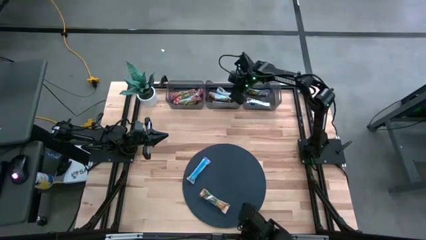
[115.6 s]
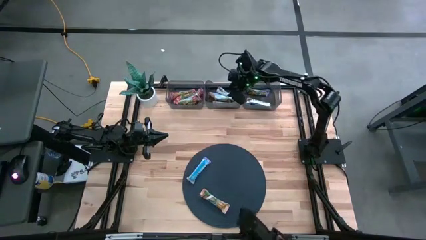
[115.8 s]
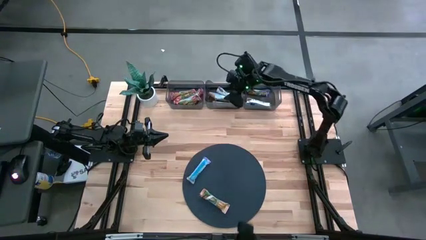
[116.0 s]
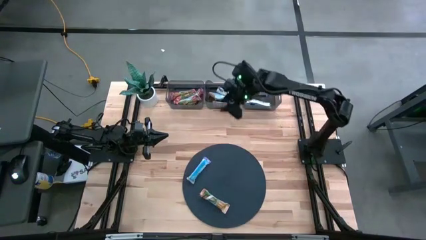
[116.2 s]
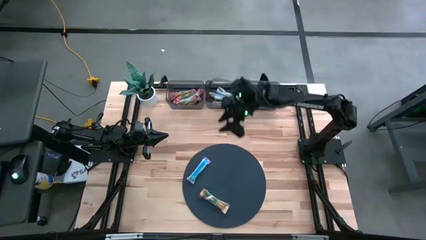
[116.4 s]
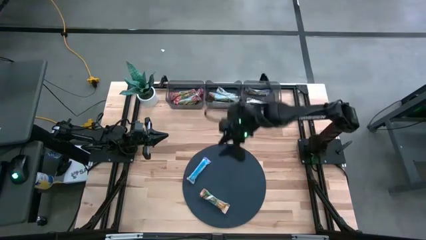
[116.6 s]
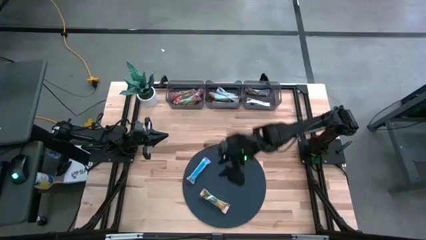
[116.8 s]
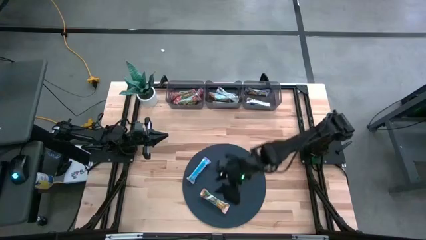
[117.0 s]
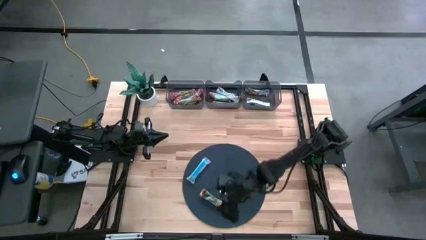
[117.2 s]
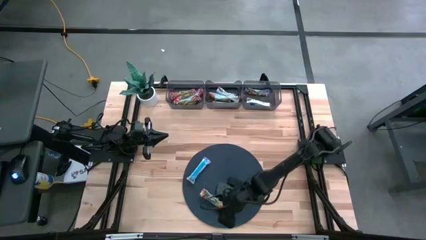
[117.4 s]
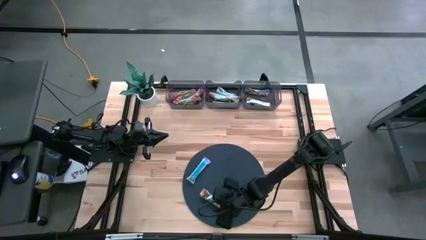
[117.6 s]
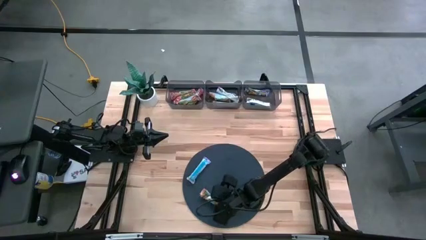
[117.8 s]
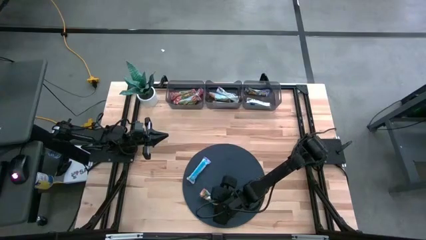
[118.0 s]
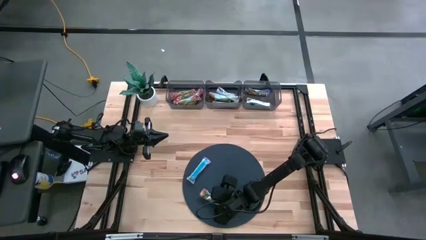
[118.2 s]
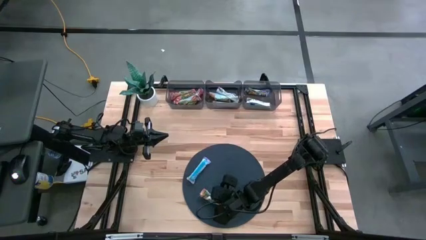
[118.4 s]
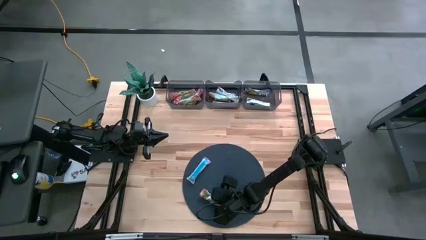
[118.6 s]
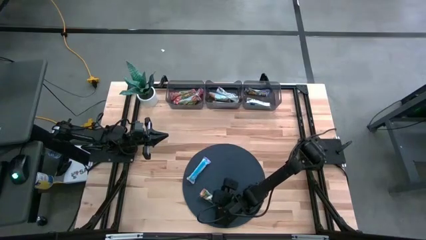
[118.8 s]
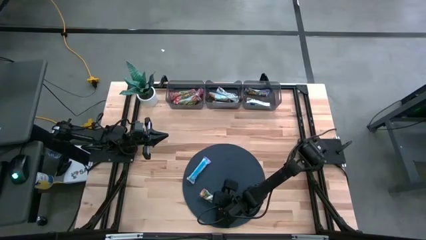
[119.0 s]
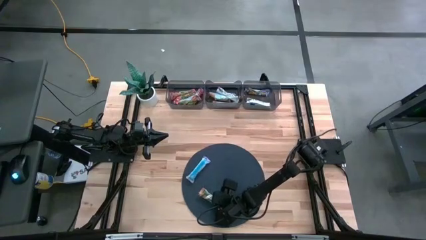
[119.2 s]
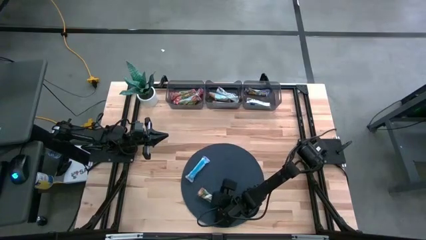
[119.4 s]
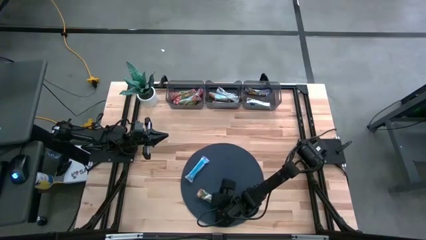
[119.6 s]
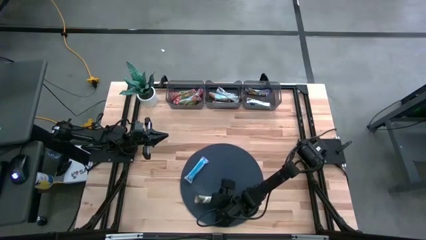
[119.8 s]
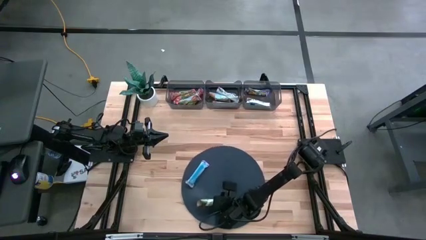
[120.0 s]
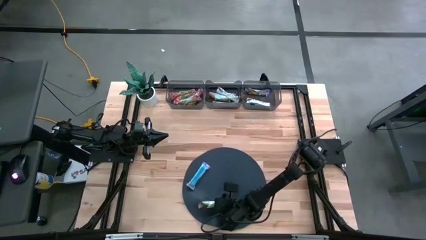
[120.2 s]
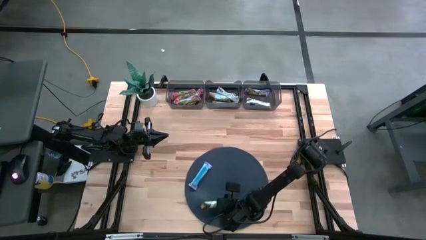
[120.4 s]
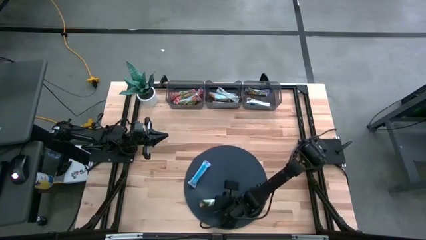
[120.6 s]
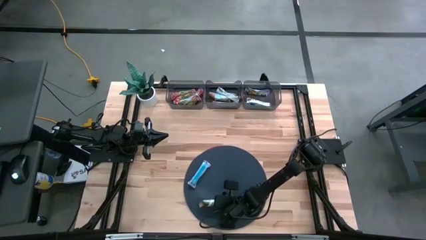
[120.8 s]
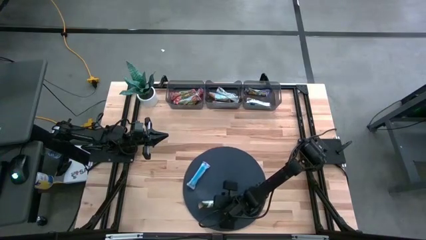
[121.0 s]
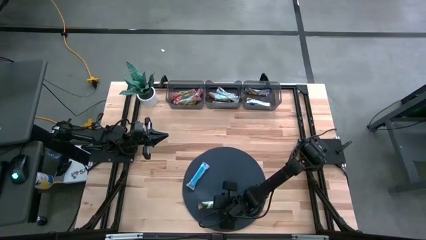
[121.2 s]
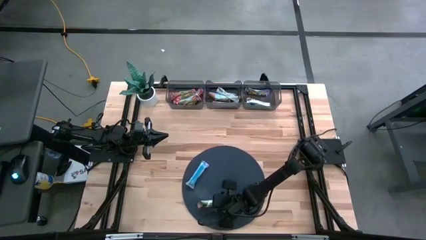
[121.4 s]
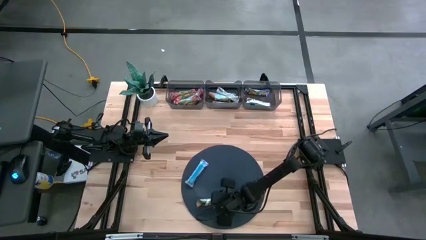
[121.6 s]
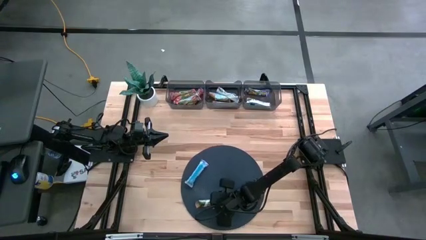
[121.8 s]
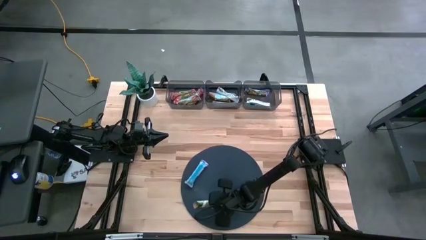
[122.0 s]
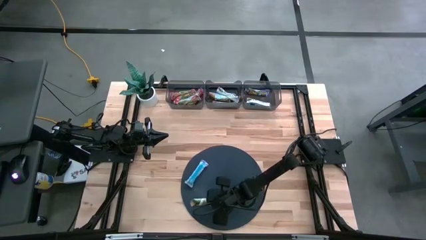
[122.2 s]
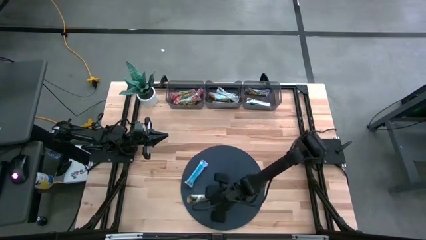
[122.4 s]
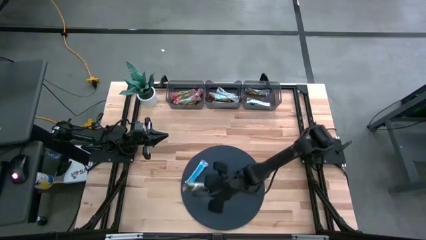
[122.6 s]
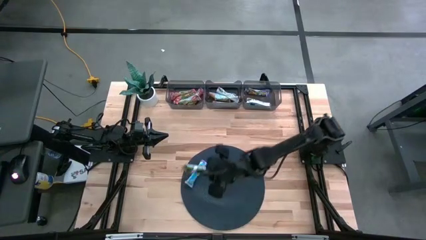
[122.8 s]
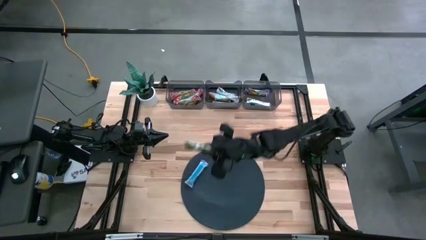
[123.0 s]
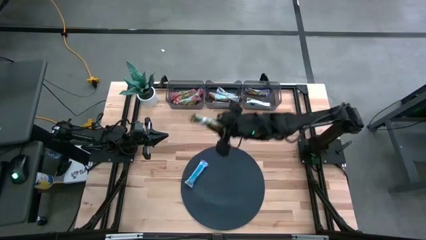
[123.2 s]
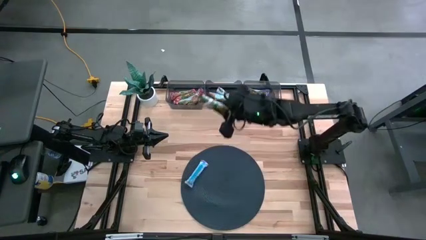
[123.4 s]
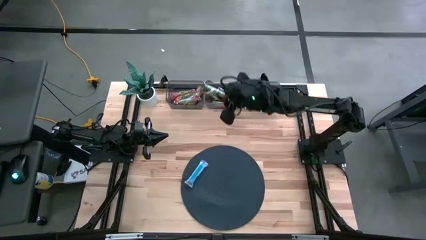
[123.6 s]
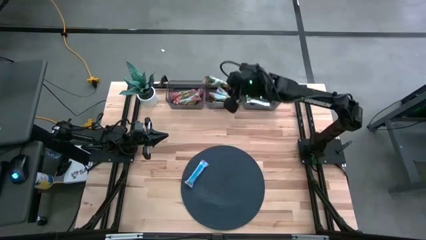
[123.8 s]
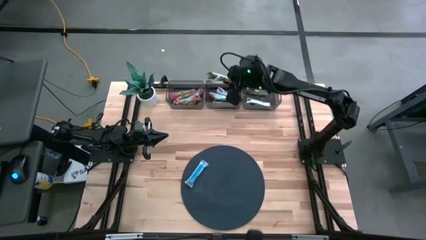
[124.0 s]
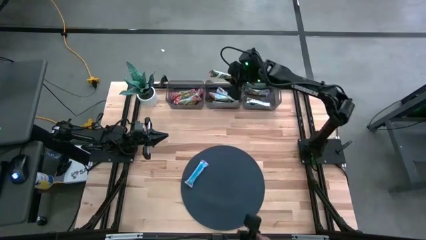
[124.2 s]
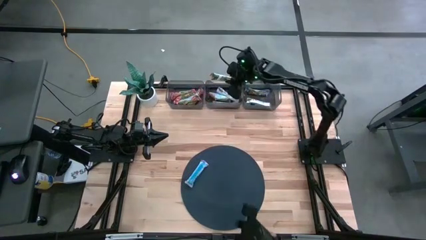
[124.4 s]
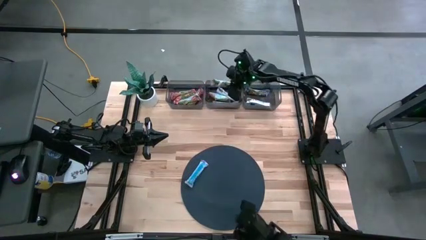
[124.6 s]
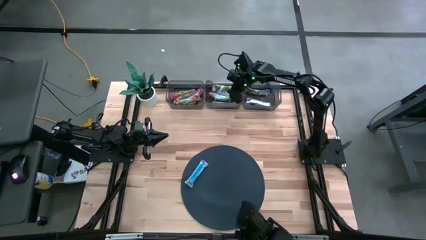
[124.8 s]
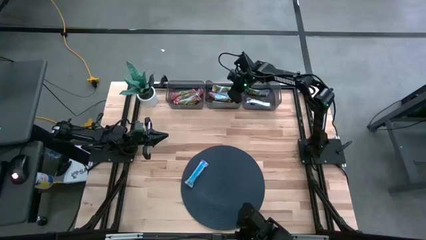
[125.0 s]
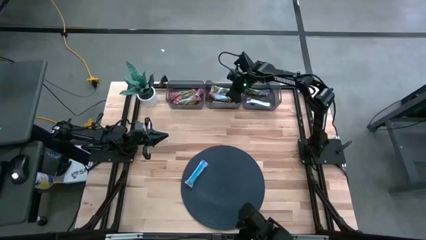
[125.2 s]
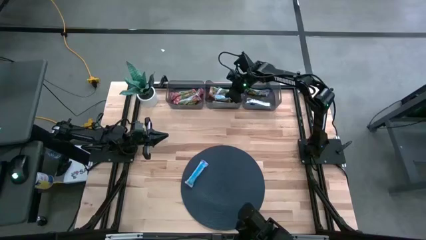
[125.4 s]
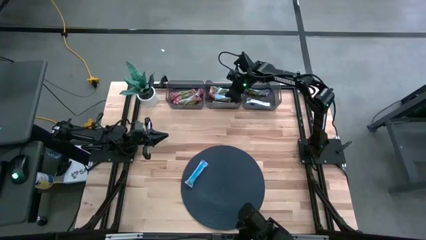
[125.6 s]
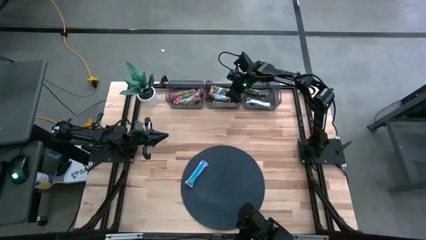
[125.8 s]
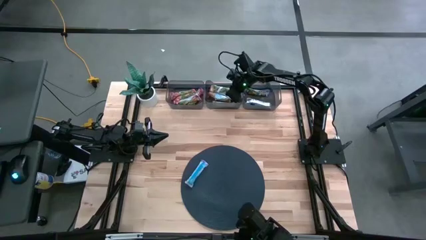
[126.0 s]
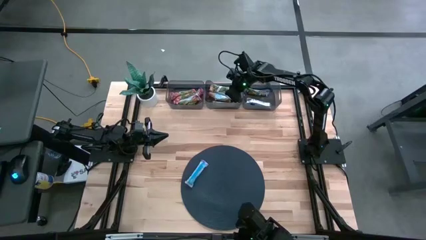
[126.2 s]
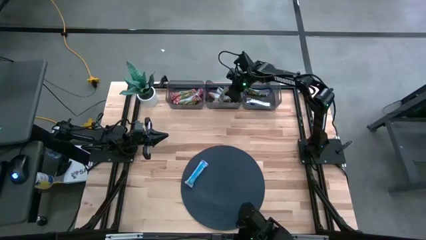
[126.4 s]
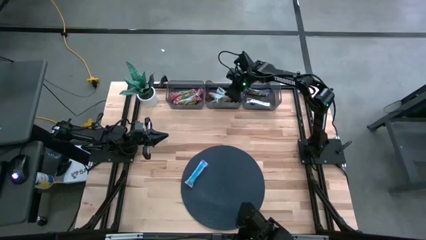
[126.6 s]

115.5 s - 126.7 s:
Task: Pick and place Granola Bars by type
Put the yellow granola bar into the middle black bin

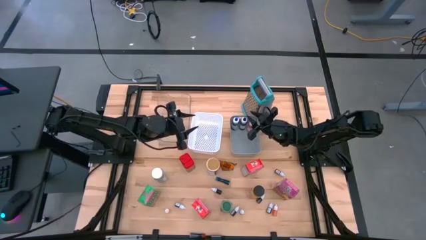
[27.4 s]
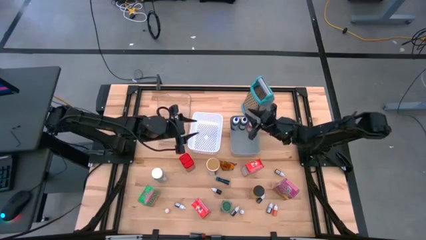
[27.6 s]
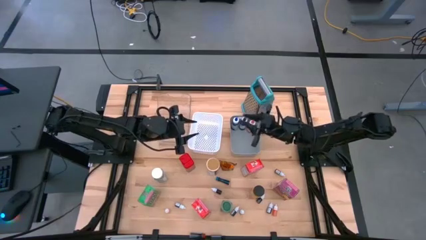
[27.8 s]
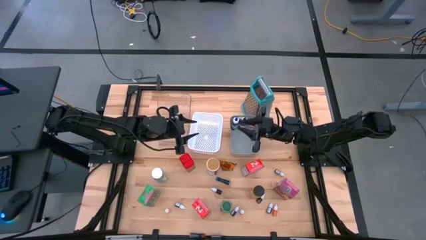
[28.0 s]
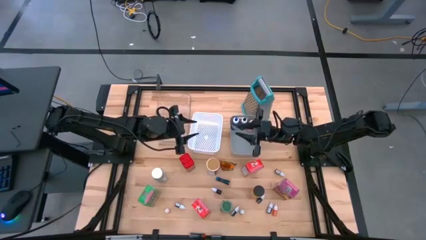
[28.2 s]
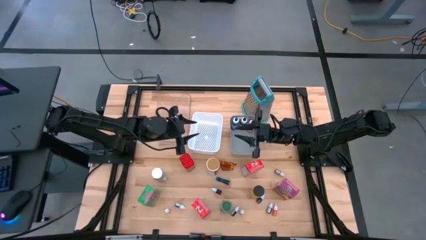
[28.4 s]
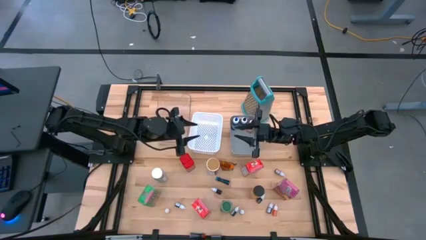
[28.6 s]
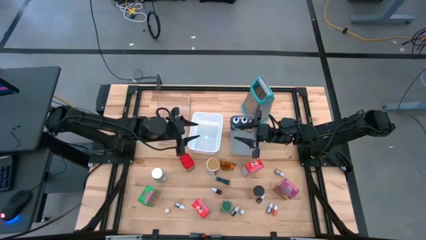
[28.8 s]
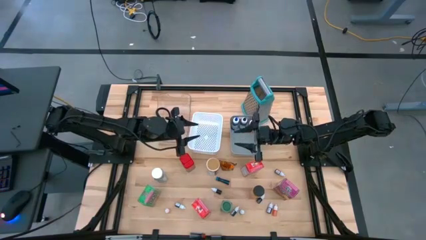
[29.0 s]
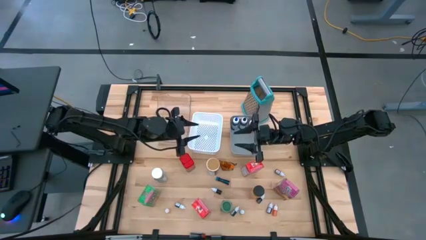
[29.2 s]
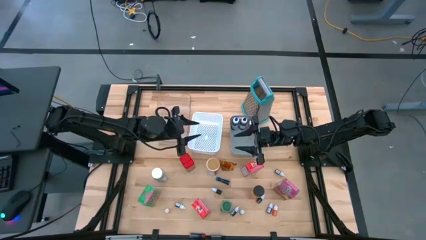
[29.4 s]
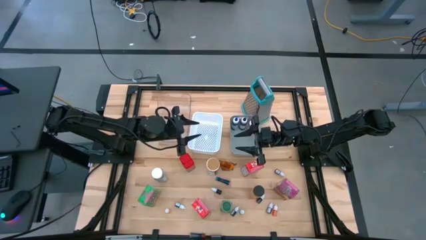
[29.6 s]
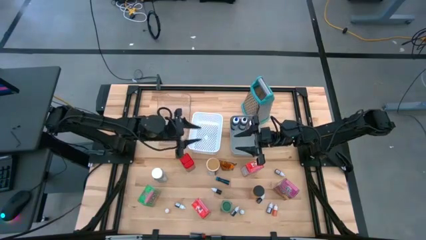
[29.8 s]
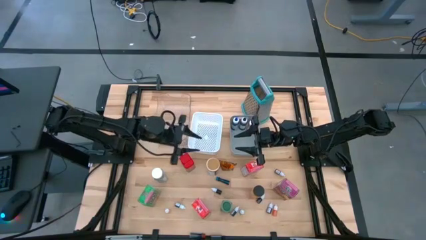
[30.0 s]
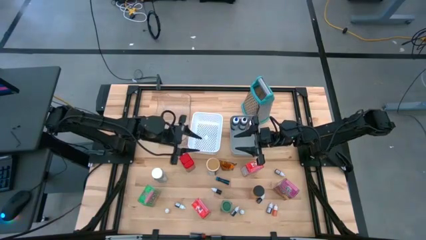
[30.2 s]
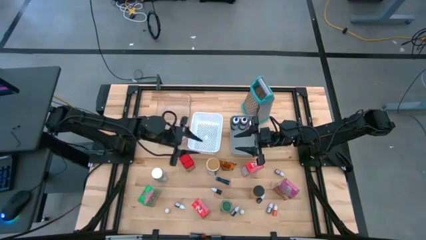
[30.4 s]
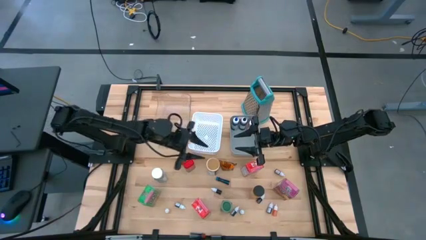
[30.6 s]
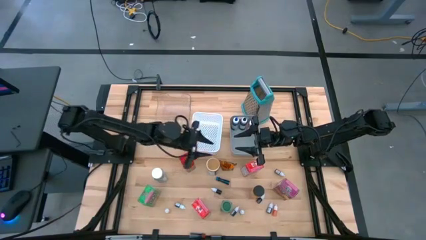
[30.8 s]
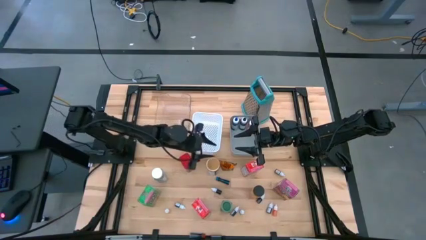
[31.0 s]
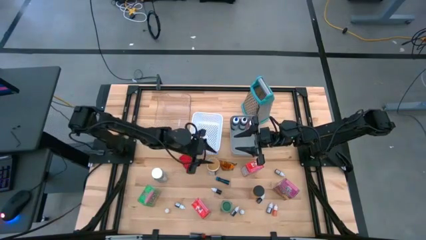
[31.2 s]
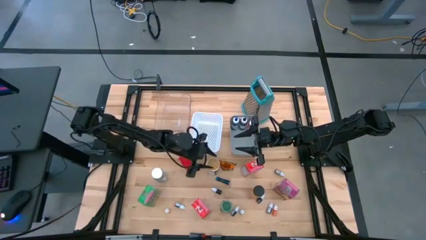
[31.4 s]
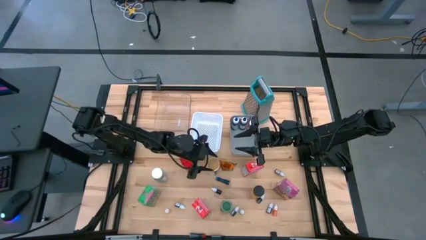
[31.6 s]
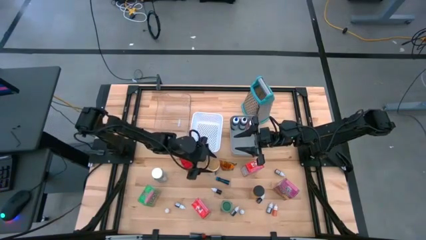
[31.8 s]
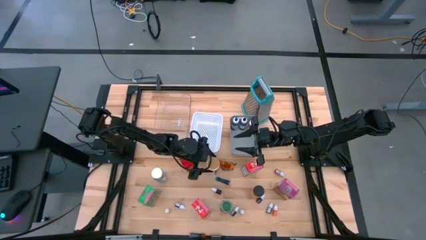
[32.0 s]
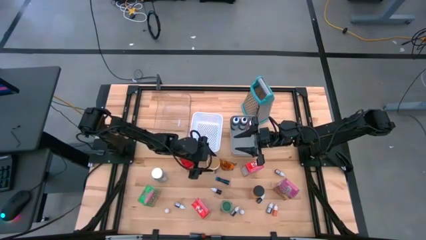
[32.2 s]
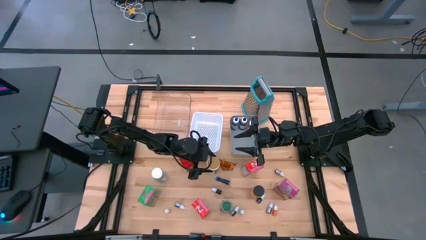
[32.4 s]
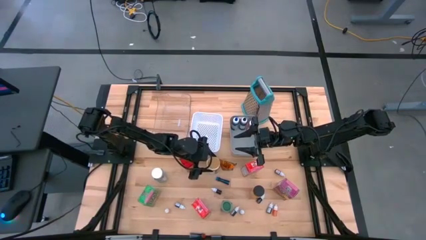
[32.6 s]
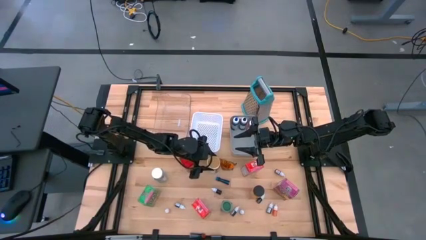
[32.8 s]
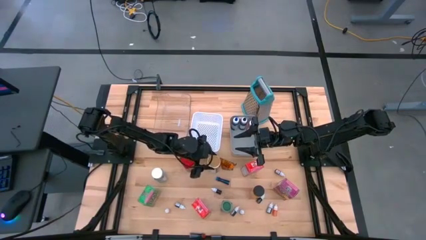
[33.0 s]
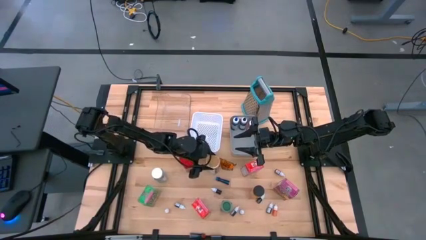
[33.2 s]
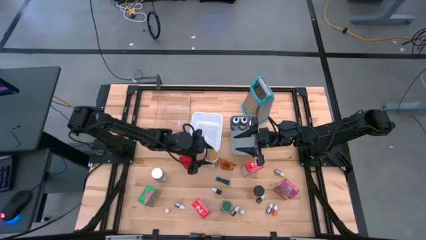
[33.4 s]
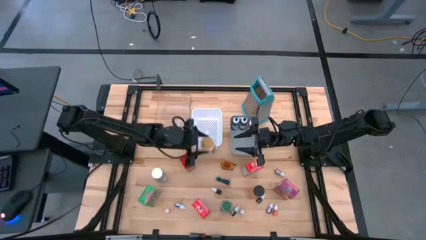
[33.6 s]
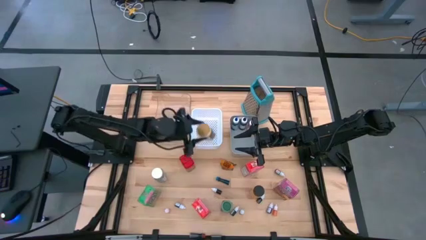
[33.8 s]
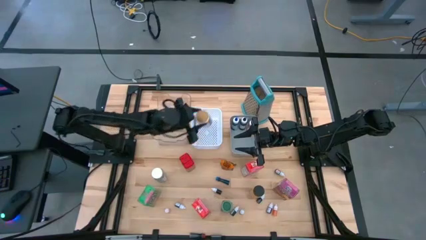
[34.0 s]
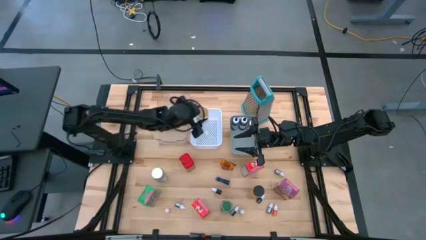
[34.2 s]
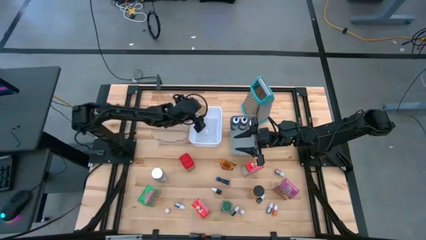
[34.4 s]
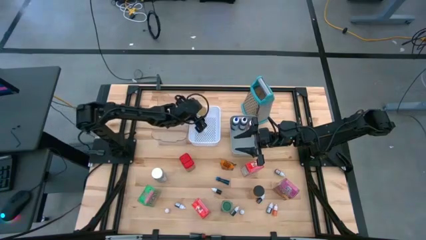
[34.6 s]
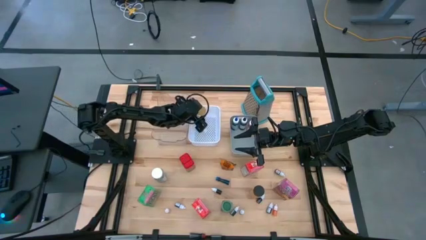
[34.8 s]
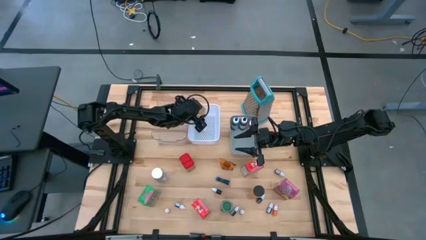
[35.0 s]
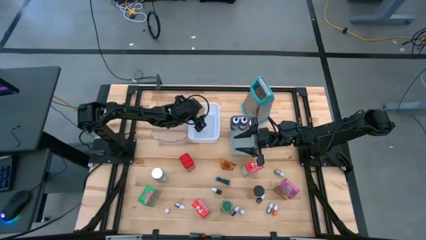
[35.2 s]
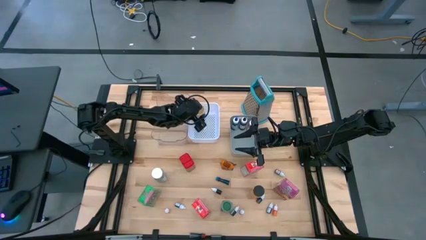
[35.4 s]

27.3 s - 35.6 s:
Task: Pick & Place Kitchen Items
Put the gold seasoning into the white basket
